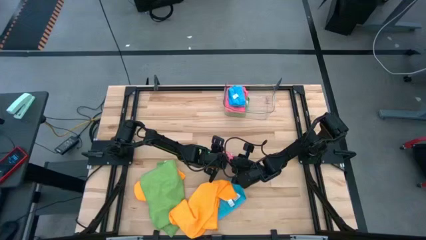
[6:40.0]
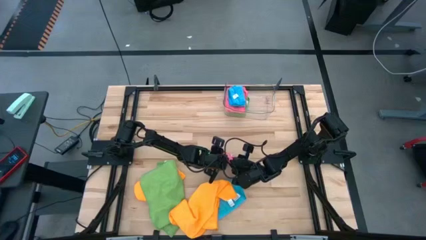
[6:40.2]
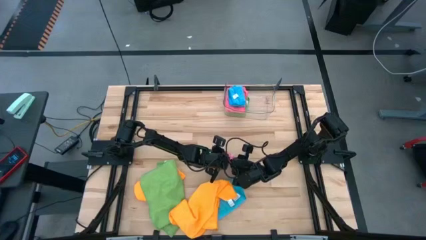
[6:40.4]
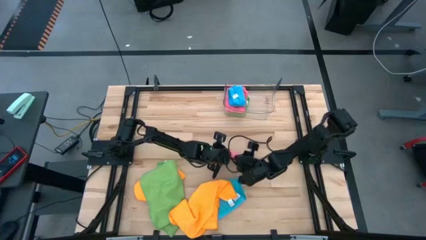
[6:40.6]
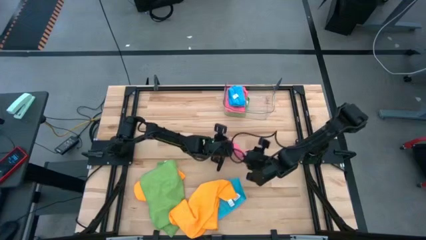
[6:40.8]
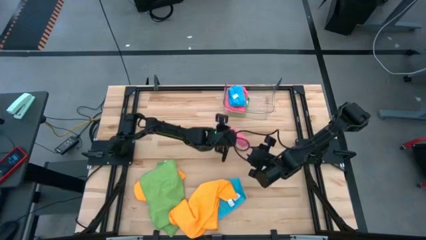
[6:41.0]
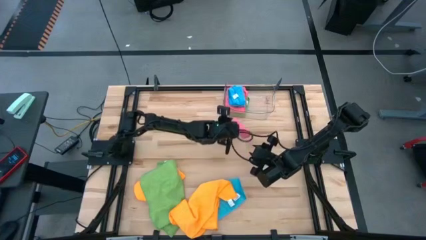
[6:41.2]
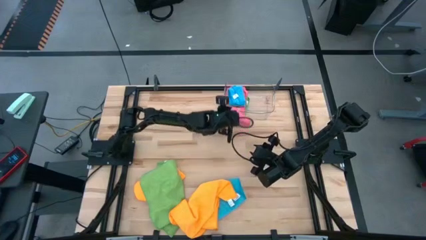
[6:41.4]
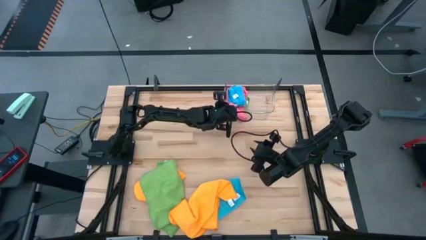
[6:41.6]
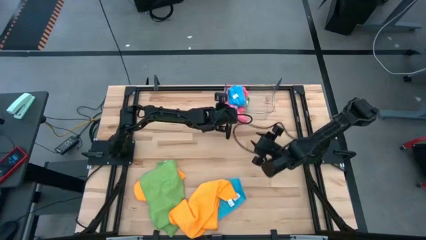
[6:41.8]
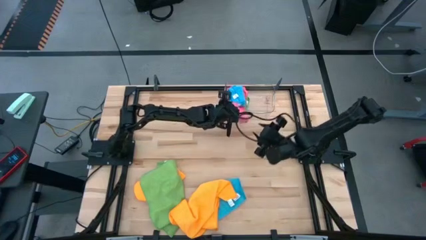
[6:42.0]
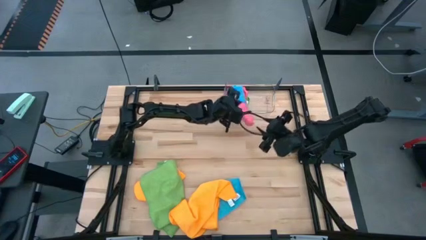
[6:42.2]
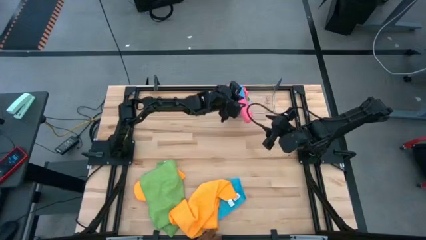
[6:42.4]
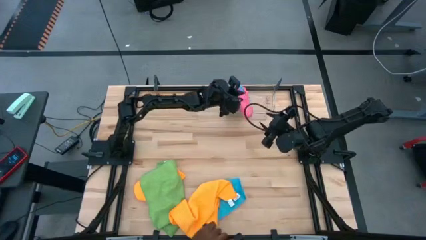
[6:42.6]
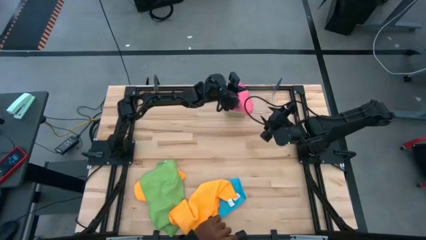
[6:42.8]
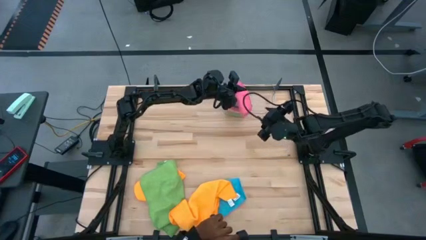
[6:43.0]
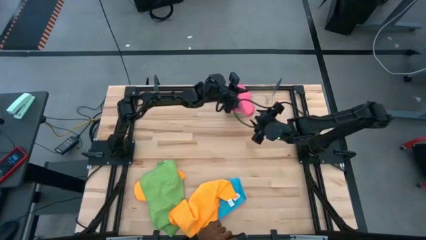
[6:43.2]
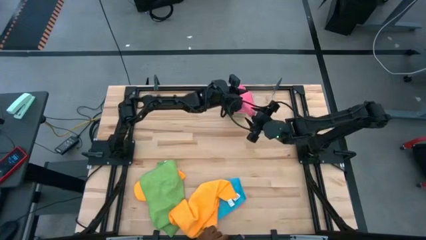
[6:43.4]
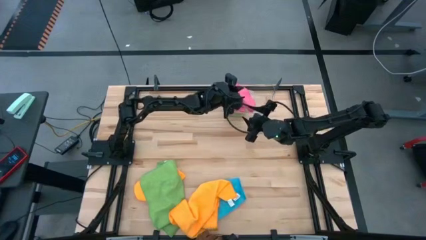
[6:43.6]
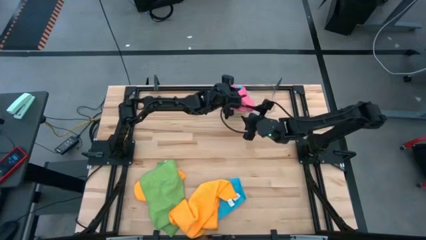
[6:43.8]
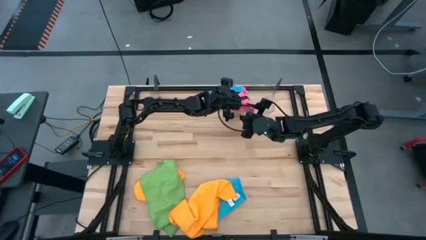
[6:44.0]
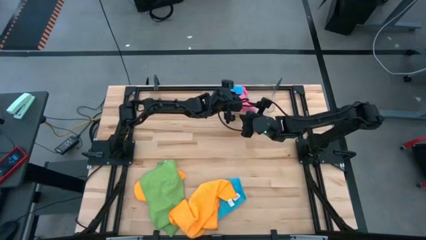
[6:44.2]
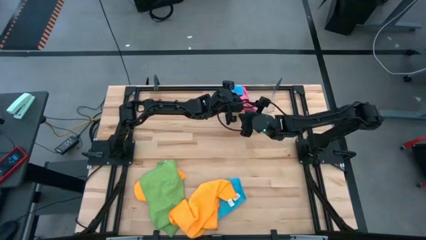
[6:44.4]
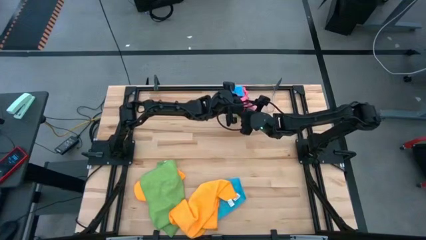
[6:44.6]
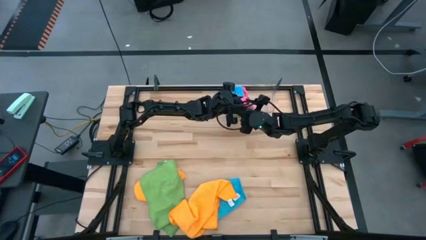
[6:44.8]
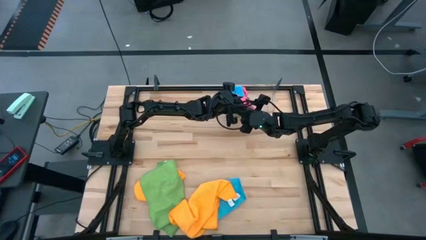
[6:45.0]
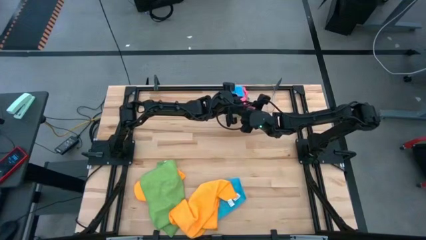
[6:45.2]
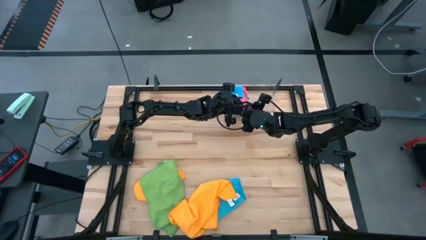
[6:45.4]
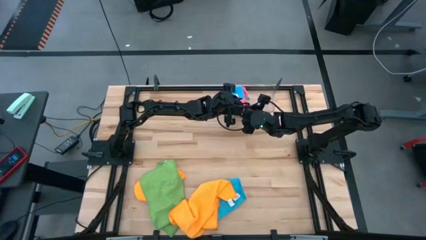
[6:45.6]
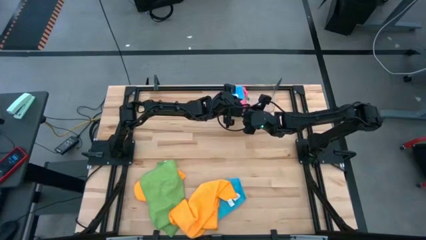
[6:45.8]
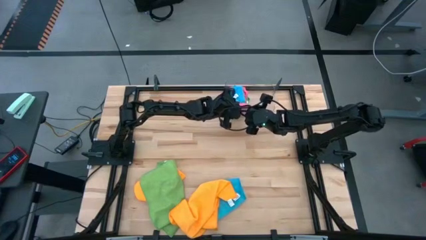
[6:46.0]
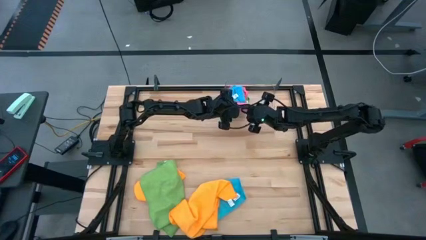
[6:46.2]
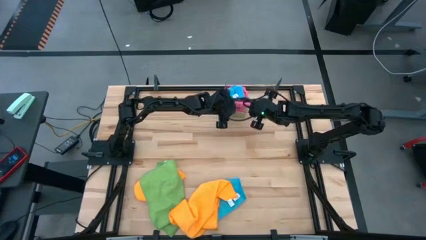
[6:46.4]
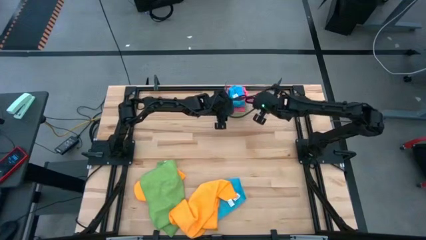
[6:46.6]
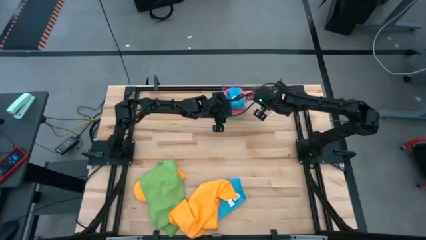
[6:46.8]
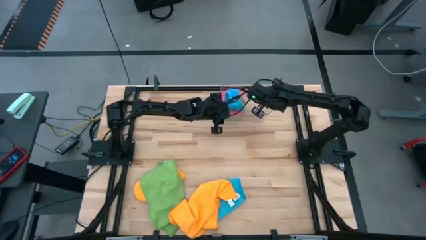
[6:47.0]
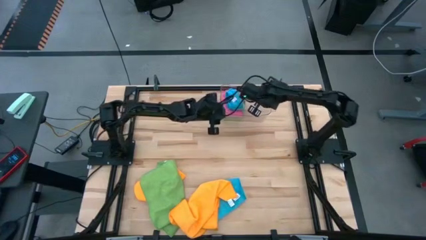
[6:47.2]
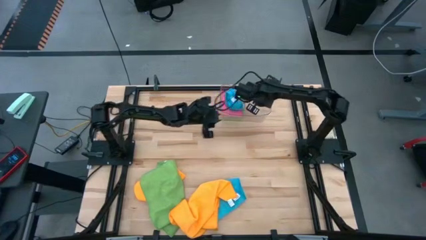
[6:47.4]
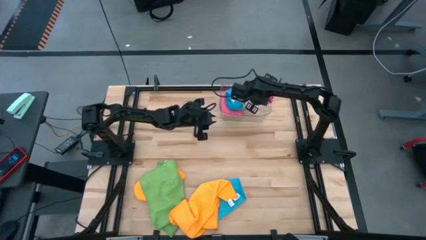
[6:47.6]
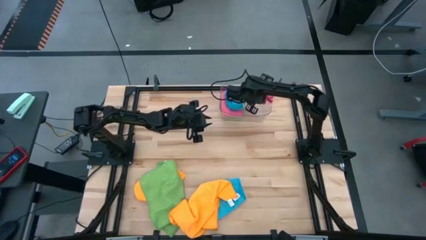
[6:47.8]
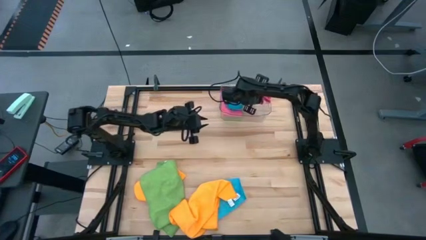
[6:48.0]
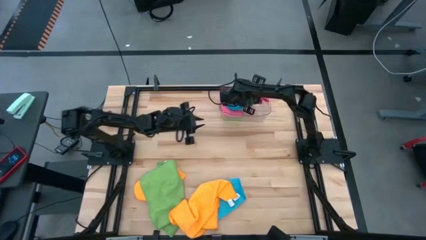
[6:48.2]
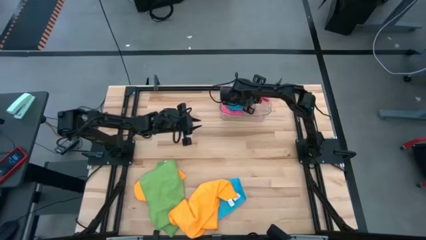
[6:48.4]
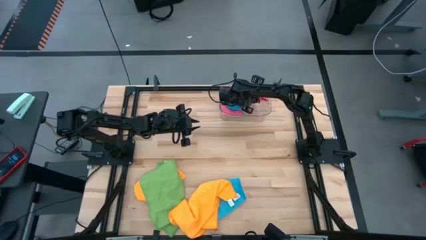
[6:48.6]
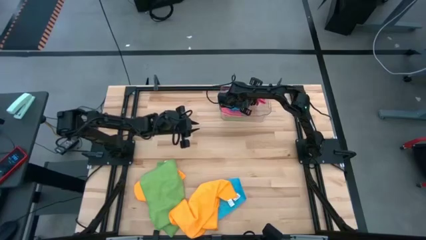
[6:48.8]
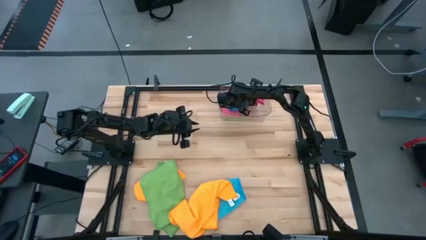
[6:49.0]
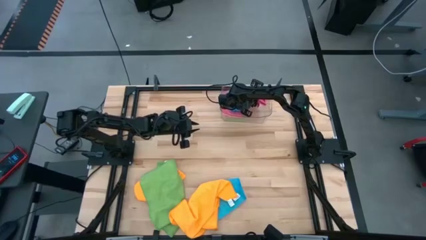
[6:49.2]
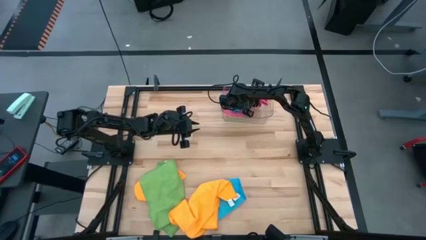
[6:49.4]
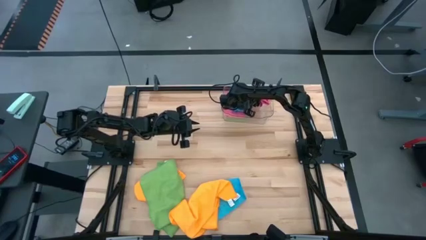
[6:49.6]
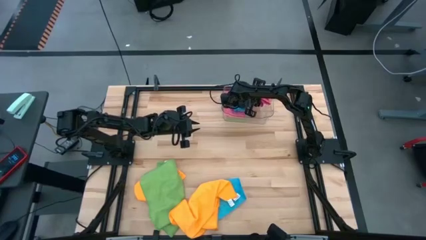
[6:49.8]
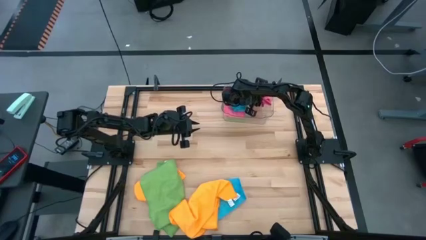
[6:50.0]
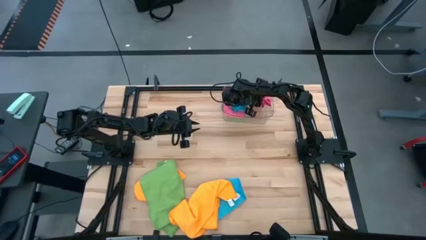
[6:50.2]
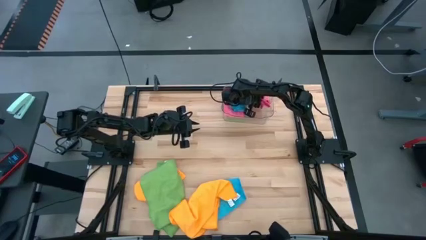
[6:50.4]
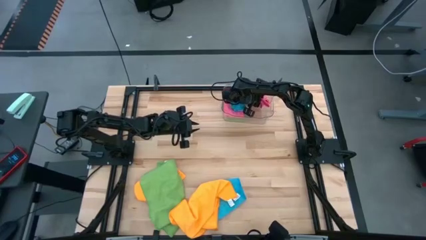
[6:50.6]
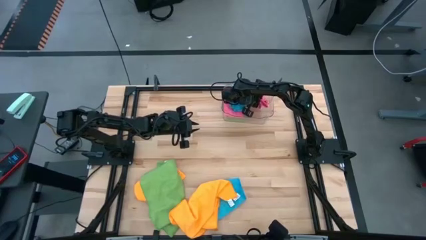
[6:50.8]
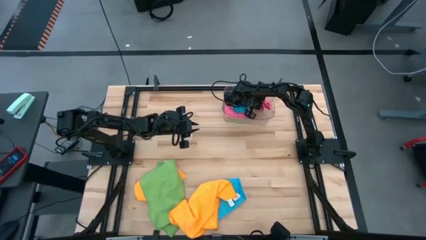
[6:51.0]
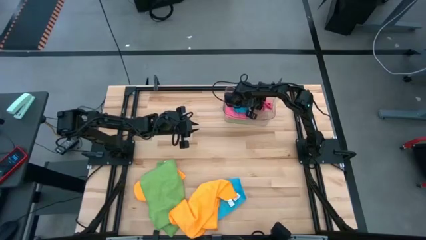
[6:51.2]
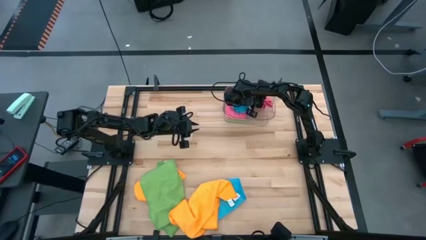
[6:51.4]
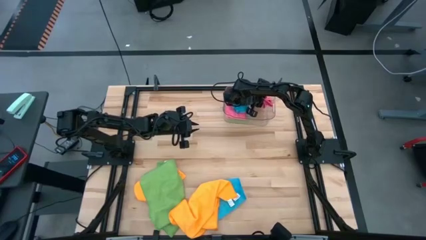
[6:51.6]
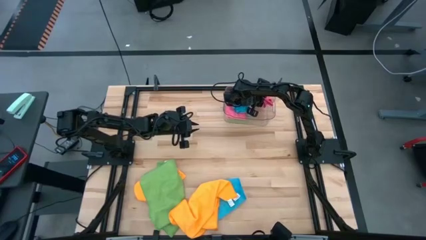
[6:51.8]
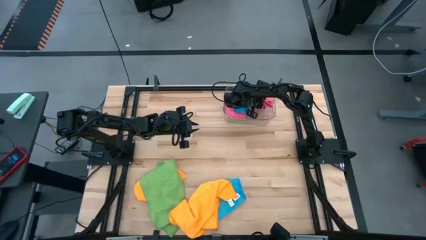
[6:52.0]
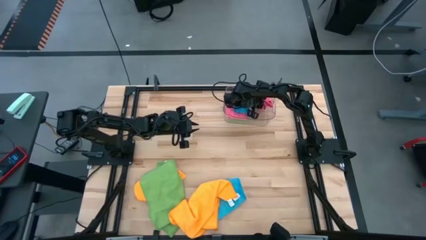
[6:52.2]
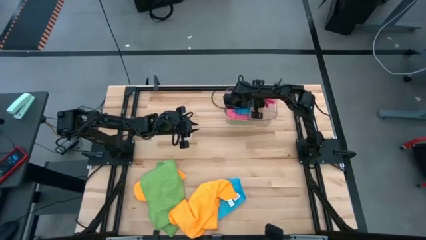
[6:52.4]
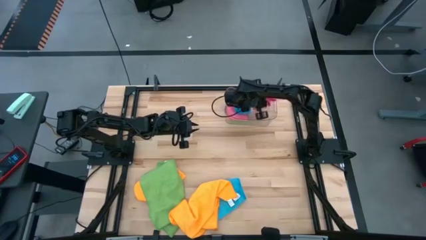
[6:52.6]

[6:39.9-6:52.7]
Task: Fold microfiber towels
Put the pink towel into the transparent bin

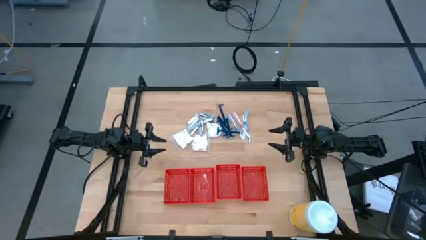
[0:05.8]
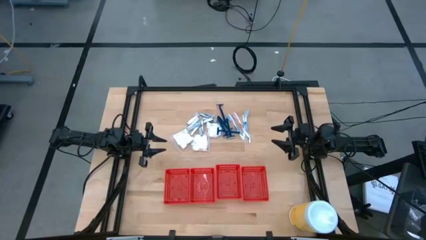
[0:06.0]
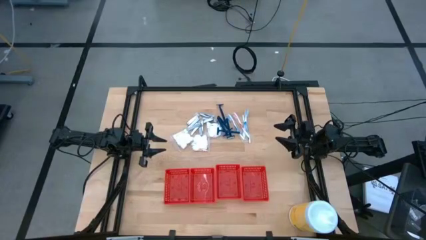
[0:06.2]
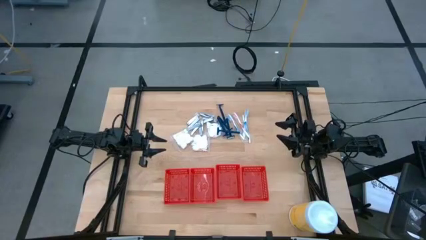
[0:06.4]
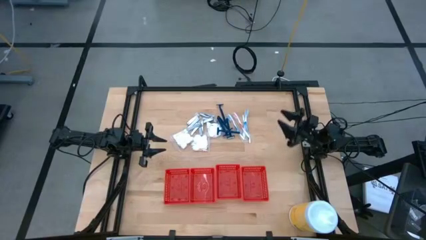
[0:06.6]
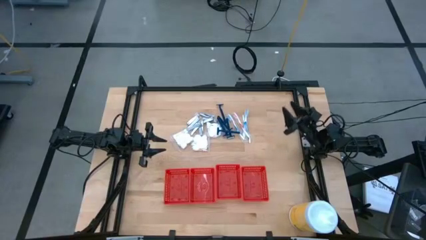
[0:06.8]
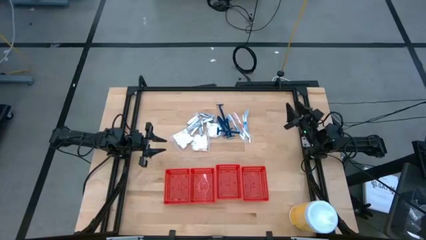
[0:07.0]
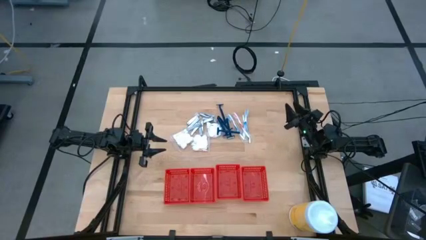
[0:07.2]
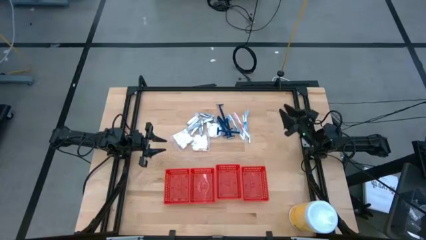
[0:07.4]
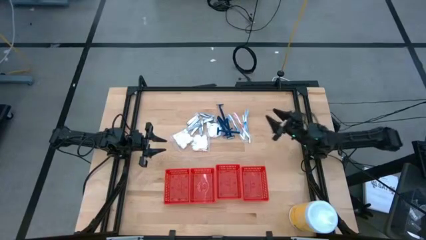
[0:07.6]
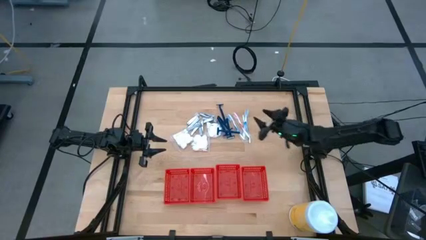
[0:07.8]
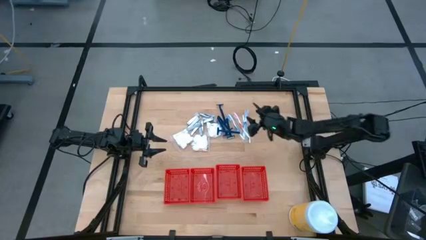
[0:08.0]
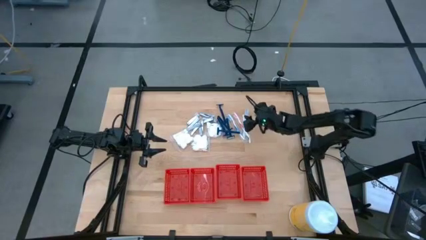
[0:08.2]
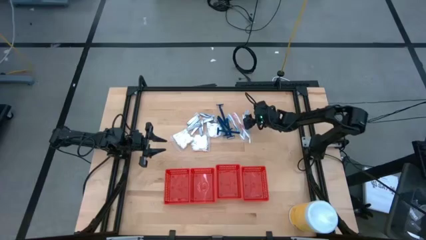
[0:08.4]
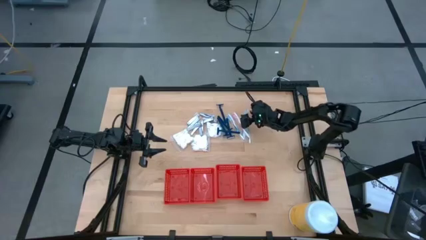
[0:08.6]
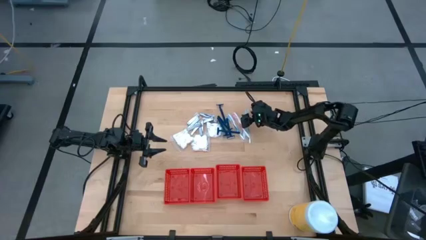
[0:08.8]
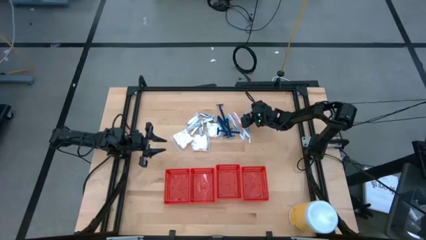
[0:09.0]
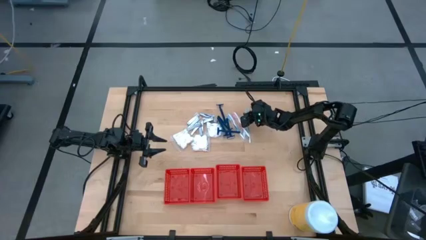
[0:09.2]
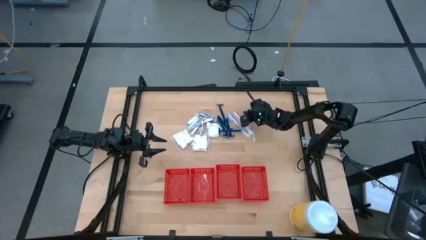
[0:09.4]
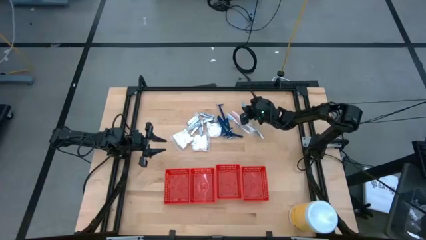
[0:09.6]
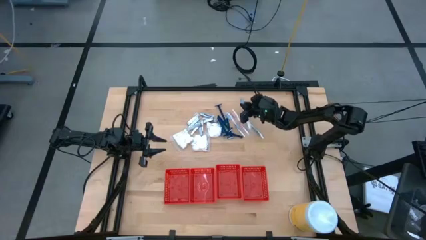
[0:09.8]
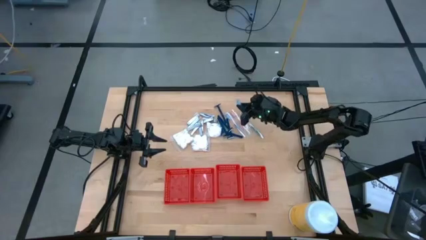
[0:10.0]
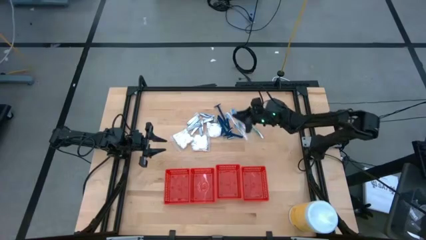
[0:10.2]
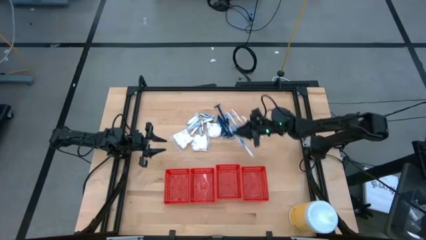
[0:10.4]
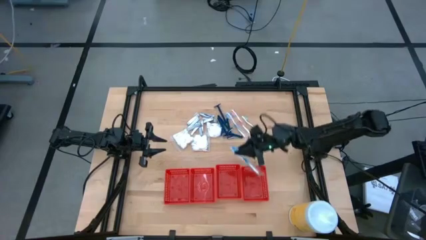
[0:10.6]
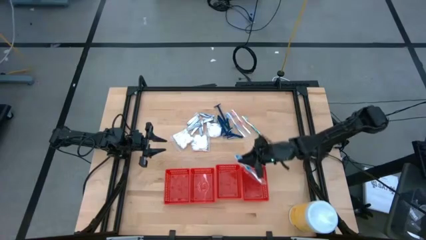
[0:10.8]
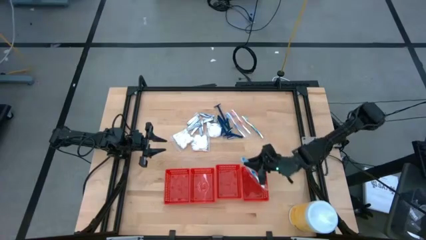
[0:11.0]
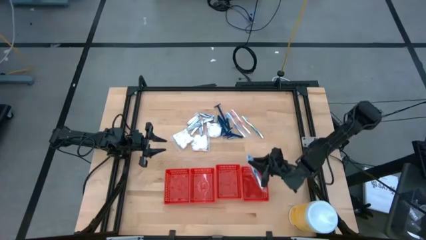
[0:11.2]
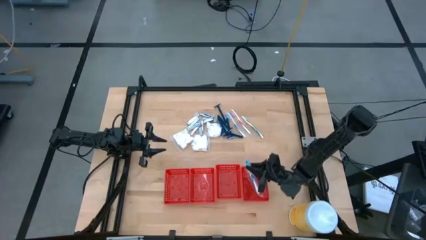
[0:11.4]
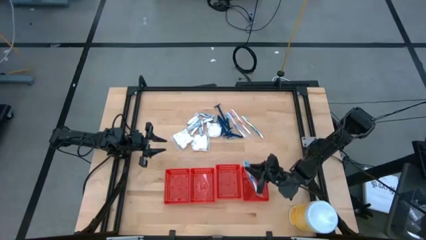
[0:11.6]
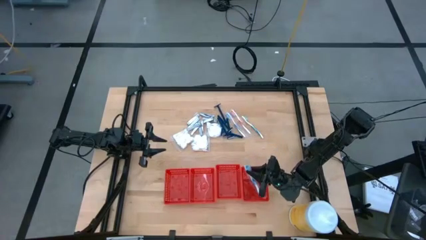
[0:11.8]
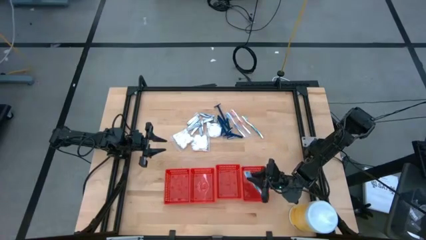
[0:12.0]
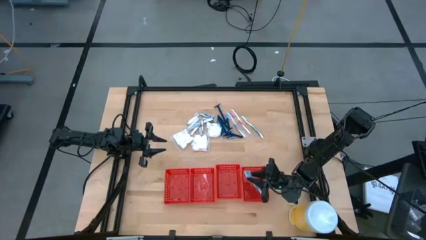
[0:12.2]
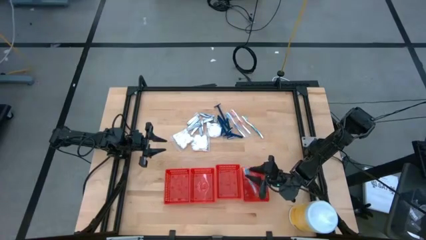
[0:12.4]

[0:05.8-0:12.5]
Task: Pick & Place Travel size toiletries
Put the blue toothbrush into the right red bin
